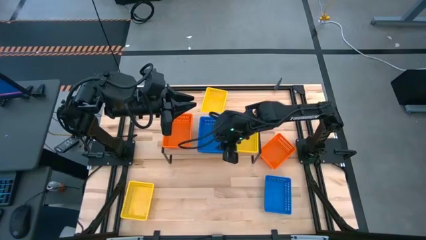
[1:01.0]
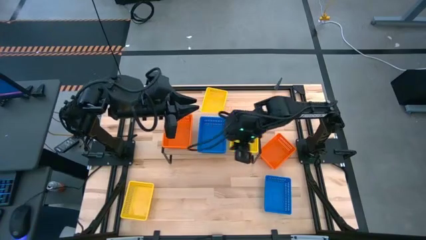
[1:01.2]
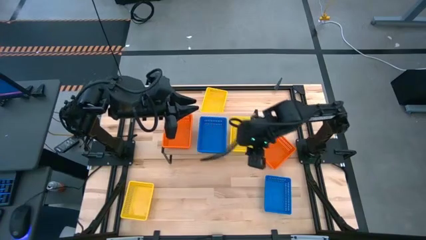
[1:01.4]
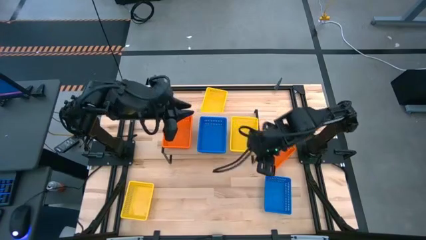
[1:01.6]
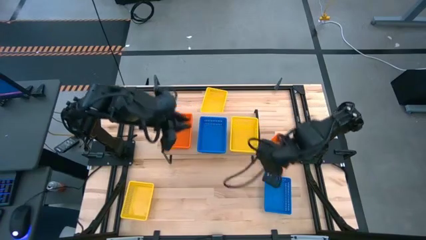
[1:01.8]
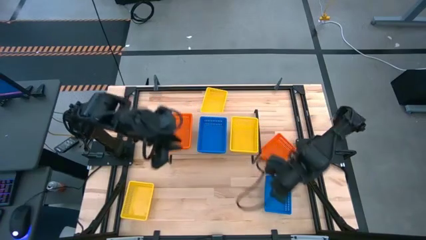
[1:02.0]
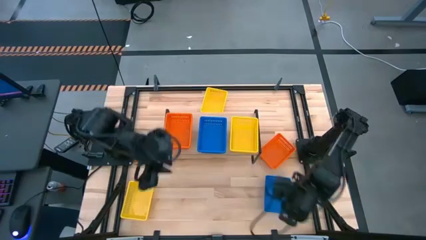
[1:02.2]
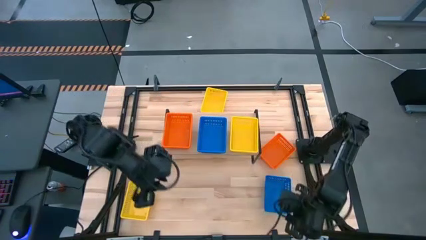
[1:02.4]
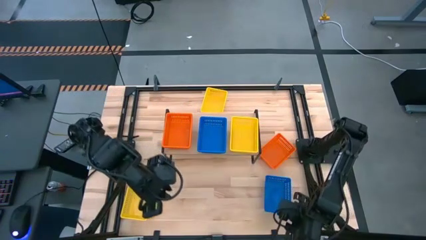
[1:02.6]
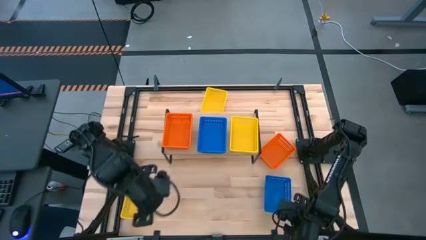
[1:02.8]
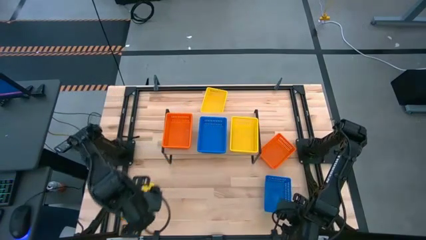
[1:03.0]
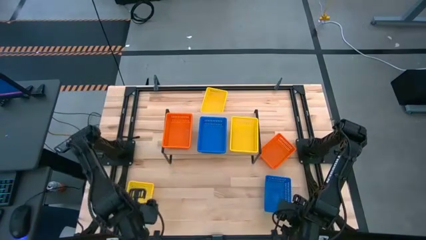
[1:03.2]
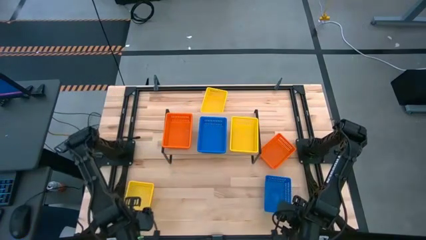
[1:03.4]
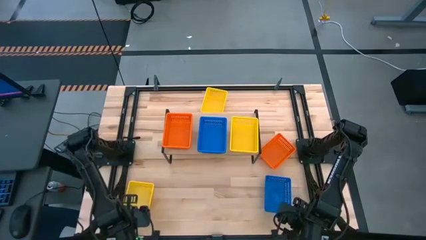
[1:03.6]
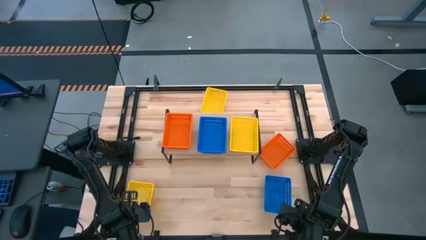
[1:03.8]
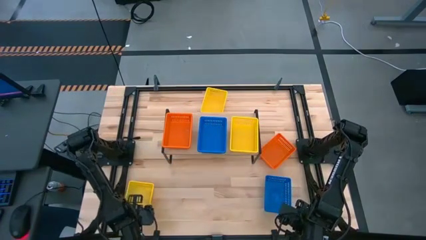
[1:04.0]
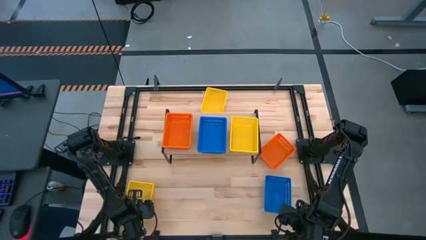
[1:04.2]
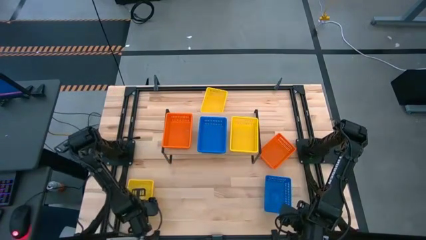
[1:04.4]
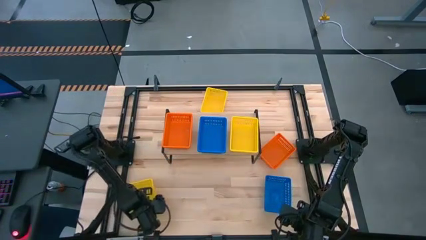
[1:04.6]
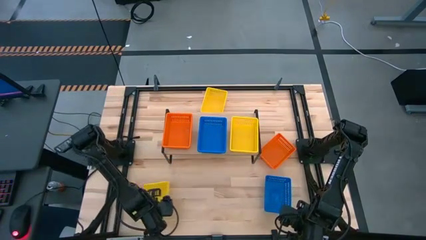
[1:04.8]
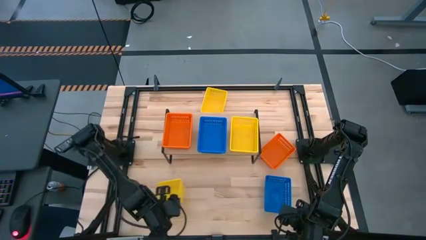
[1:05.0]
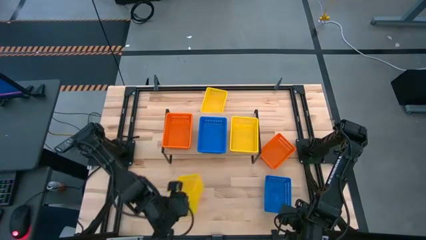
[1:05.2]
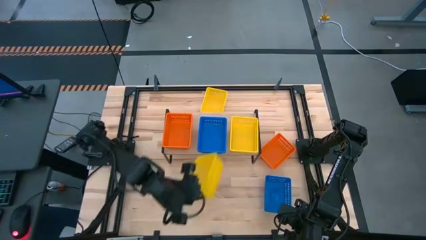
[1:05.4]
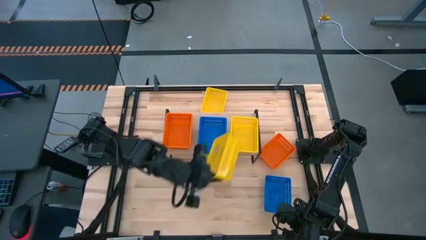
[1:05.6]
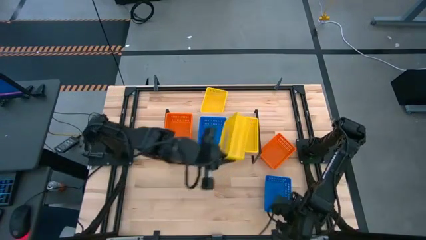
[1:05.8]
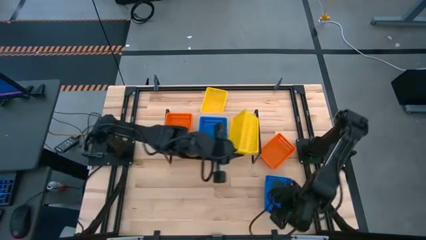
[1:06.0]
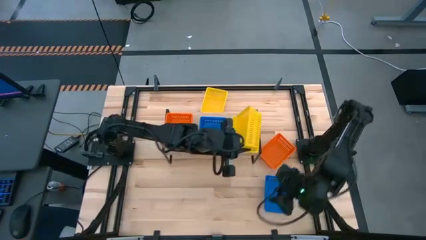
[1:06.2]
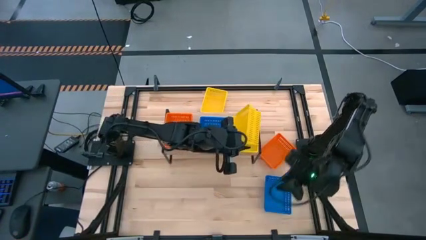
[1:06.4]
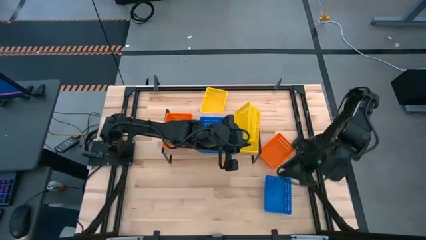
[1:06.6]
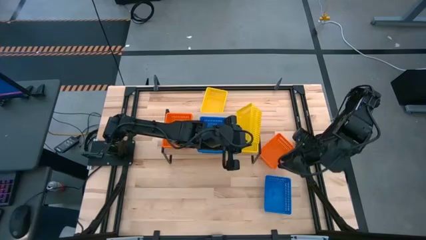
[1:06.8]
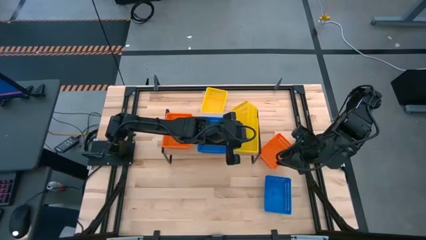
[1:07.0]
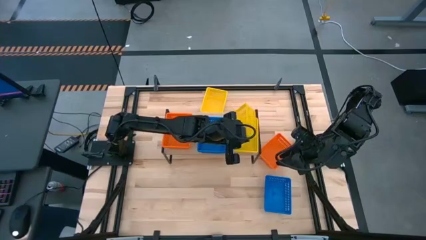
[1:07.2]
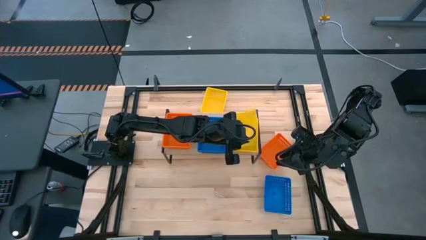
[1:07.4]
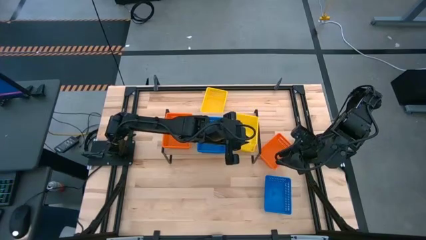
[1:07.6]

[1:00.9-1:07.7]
Task: Stack baskets on shelf by color
Stack the bottom yellow bin on top of the yellow bin on the shelf

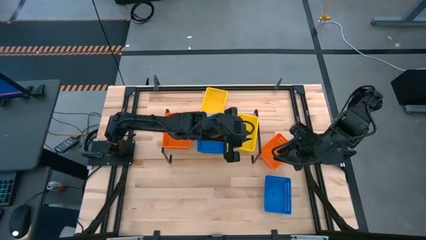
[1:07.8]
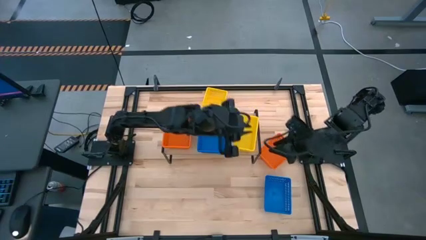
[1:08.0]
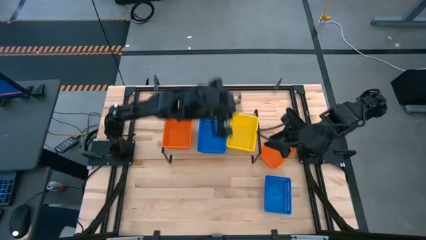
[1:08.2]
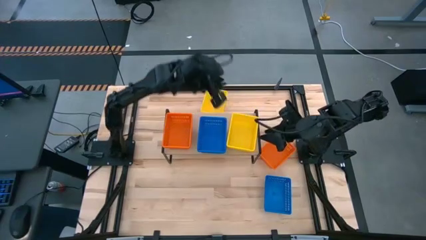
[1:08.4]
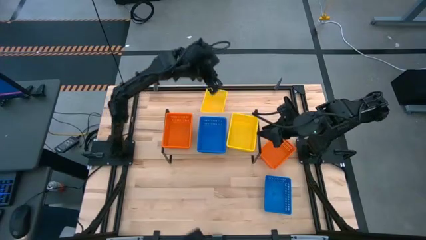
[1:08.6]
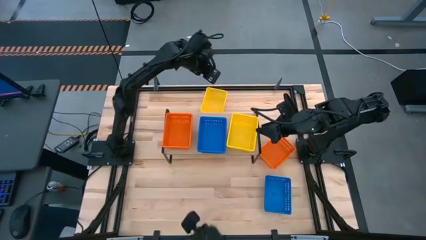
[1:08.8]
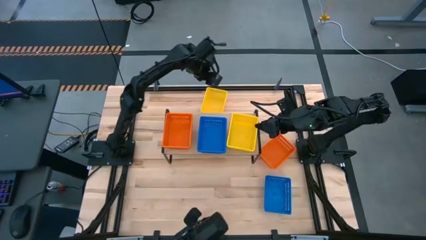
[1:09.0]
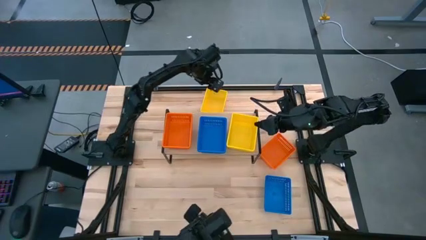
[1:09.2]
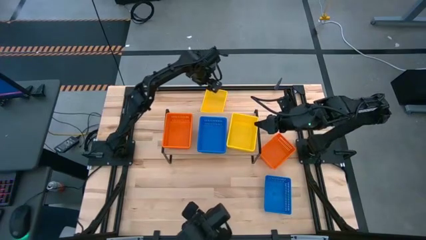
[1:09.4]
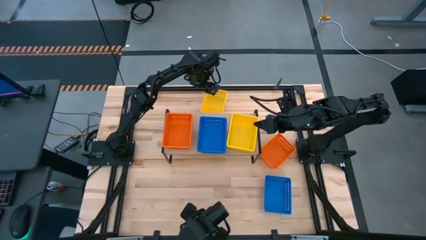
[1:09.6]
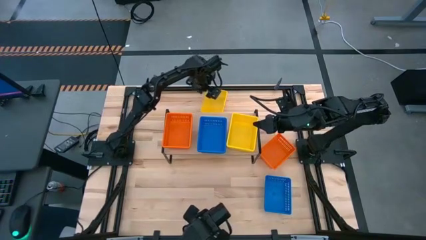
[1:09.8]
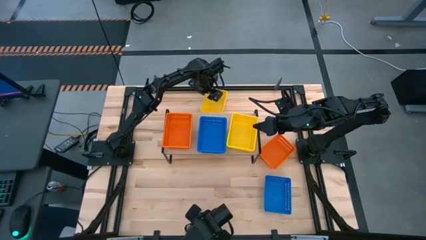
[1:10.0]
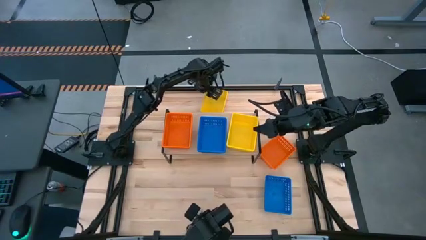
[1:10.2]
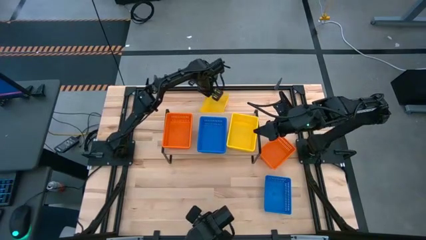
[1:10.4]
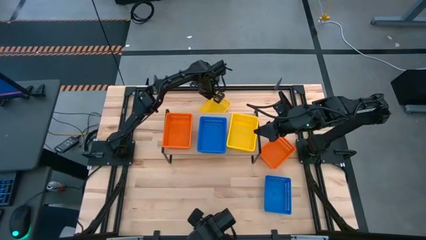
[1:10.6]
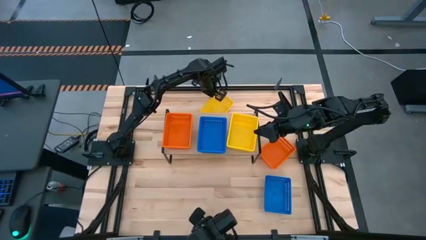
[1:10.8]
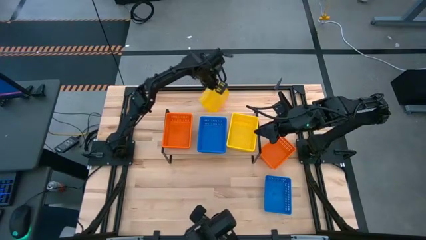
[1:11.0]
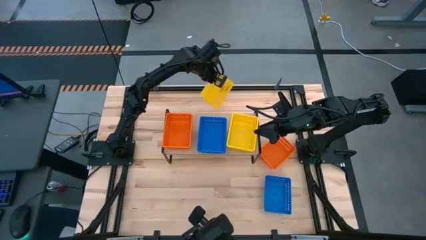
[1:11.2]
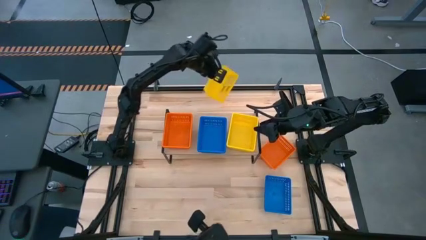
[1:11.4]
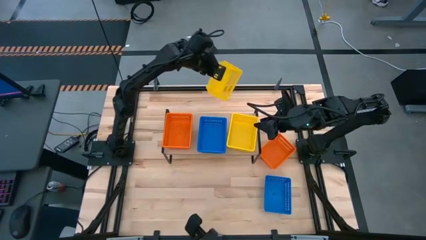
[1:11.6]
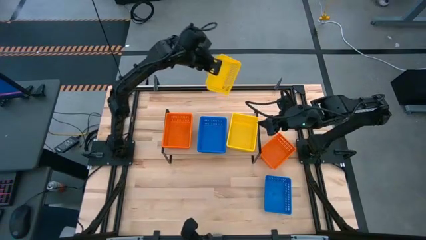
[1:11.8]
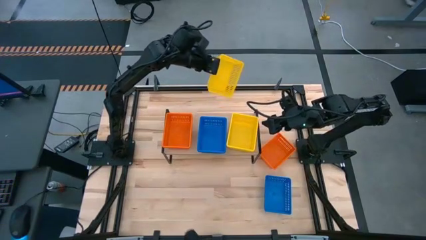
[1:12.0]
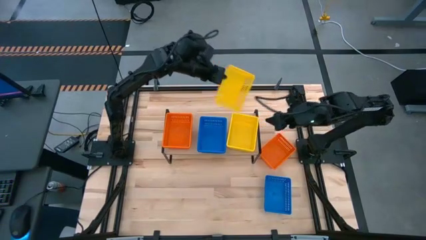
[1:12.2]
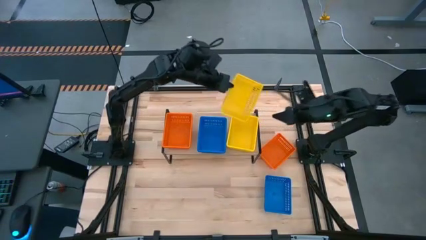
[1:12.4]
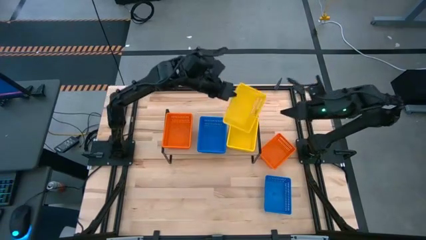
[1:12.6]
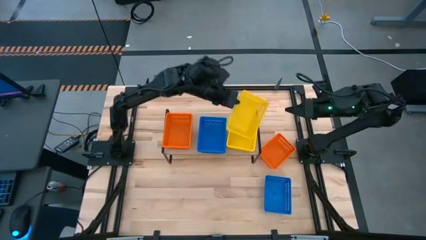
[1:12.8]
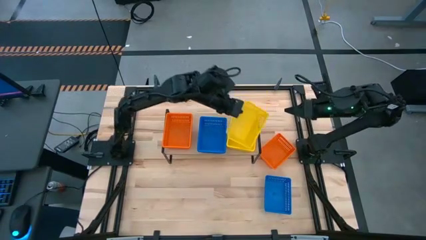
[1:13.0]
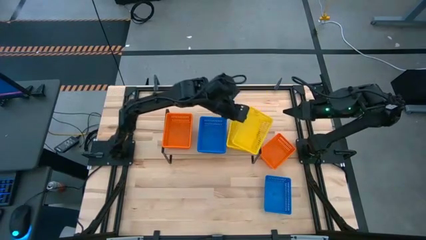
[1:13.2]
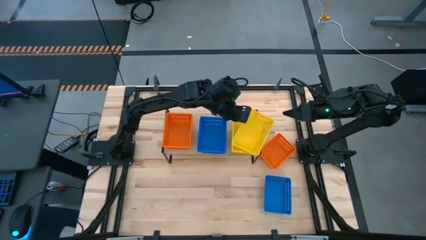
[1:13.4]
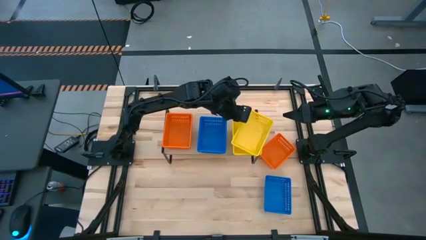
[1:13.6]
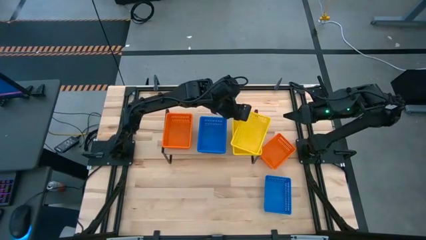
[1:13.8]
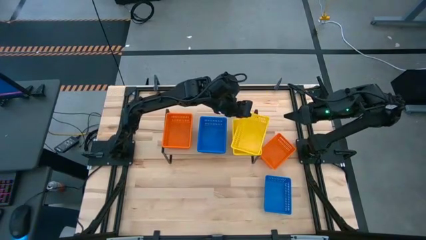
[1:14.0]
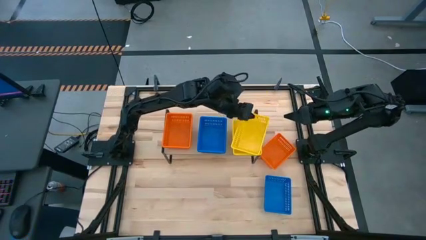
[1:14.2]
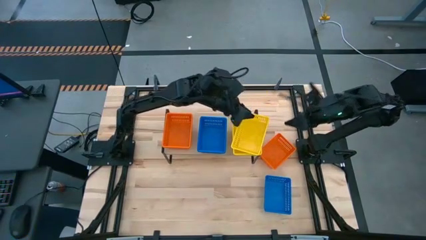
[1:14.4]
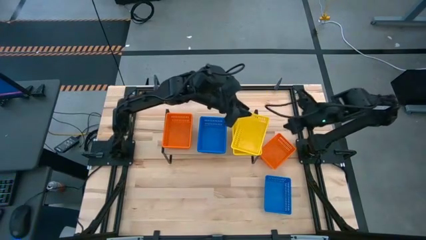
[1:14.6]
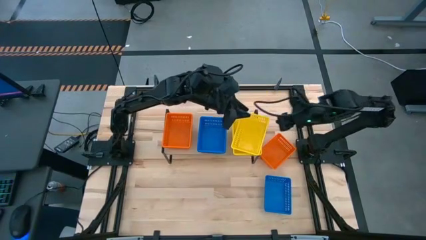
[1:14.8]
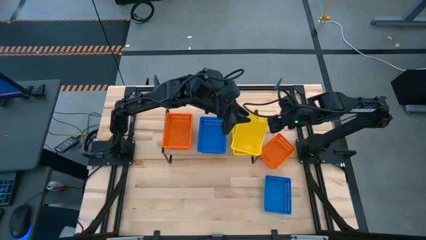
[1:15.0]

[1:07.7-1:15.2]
Stack the yellow bin on top of the yellow bin on the shelf

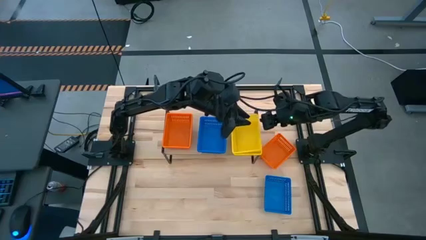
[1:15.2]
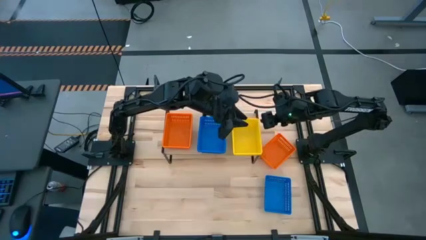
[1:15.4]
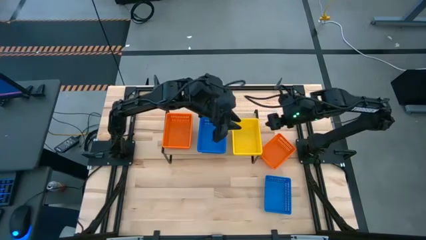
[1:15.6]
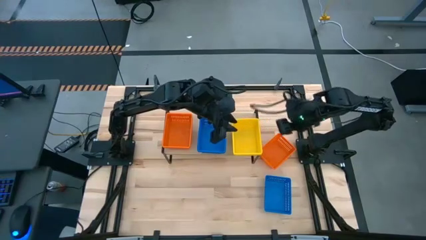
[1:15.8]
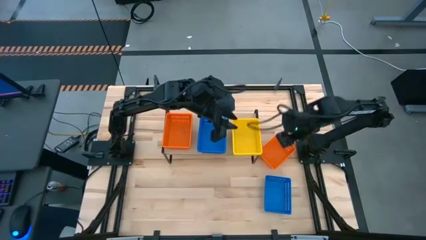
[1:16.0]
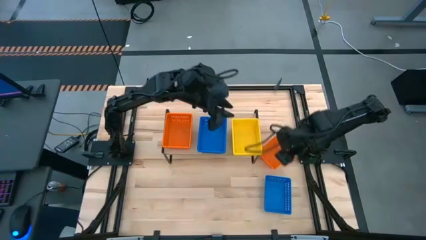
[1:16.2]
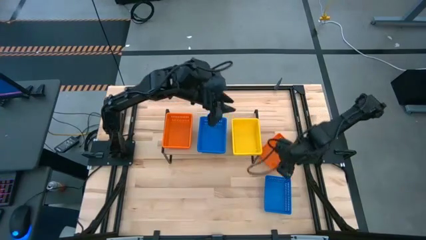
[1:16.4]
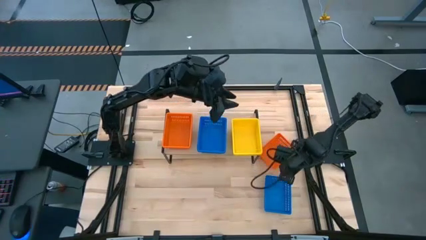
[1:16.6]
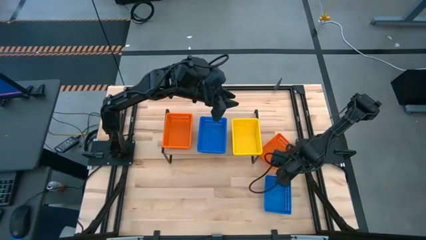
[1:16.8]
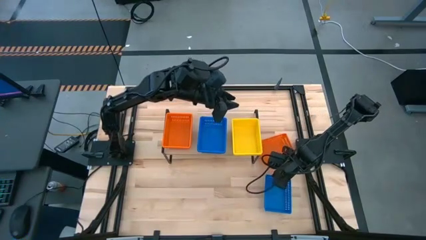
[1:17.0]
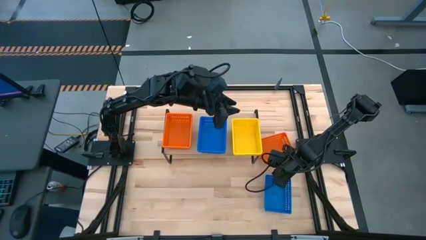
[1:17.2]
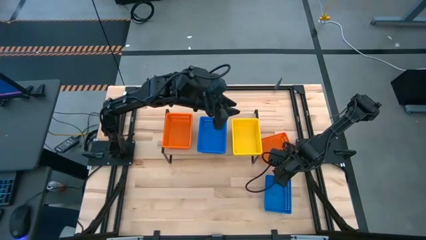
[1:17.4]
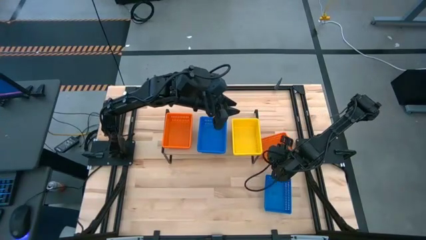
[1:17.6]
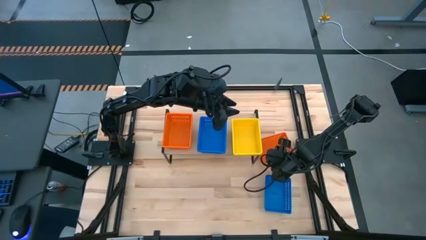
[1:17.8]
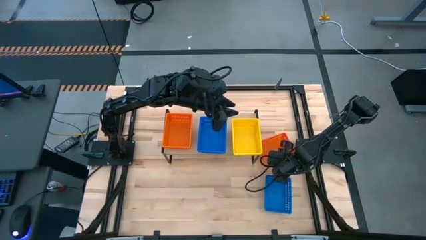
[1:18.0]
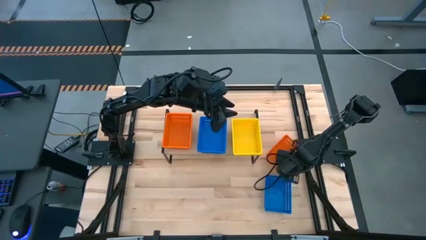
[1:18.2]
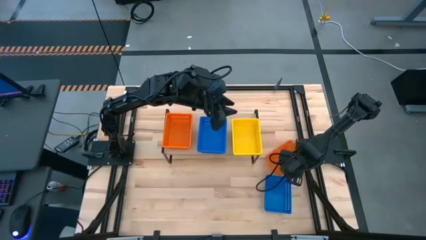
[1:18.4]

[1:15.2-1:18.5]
Stack the orange bin on top of the orange bin on the shelf
